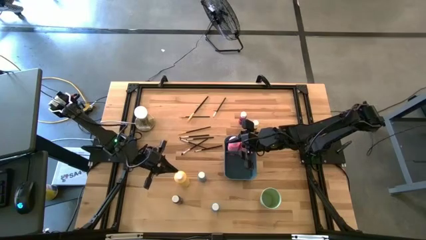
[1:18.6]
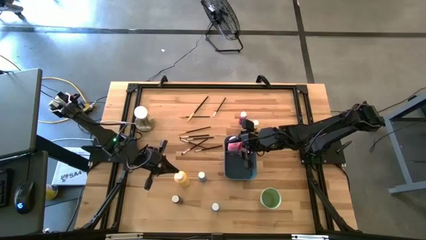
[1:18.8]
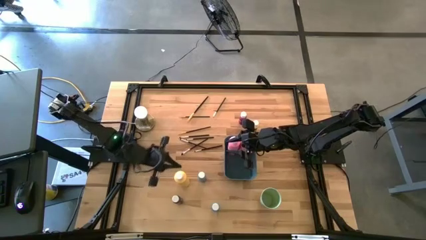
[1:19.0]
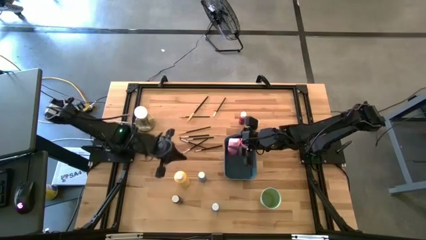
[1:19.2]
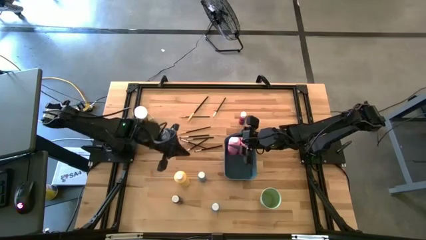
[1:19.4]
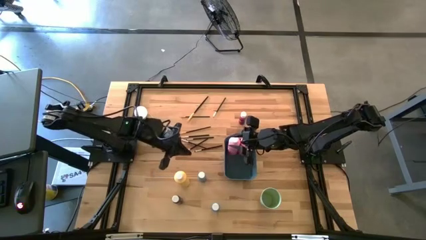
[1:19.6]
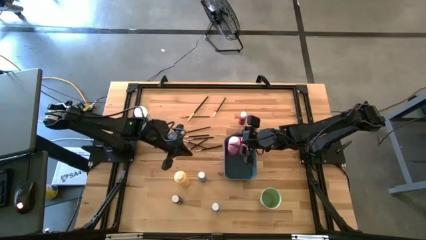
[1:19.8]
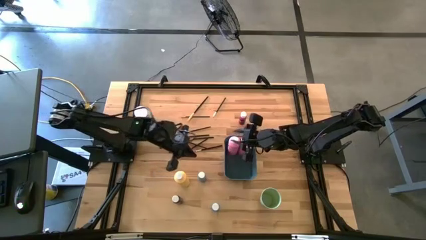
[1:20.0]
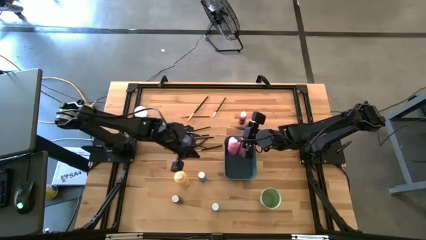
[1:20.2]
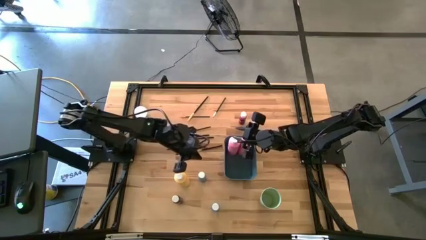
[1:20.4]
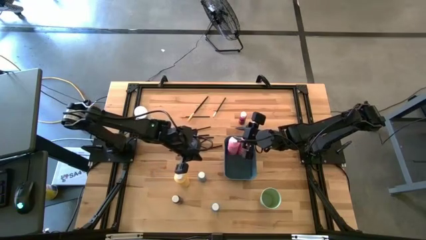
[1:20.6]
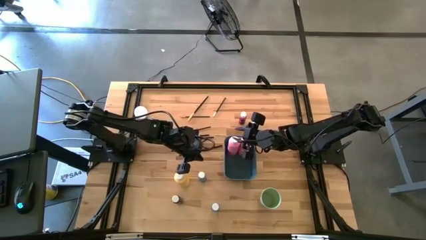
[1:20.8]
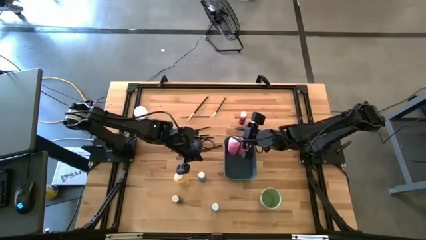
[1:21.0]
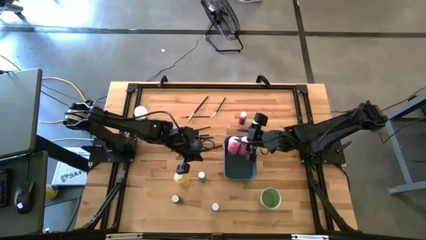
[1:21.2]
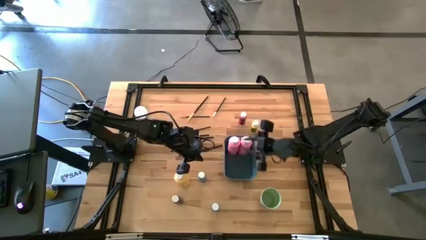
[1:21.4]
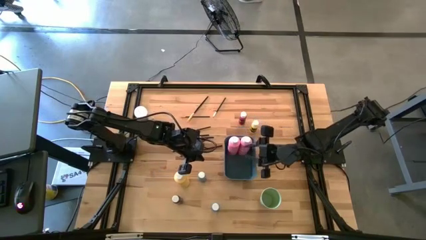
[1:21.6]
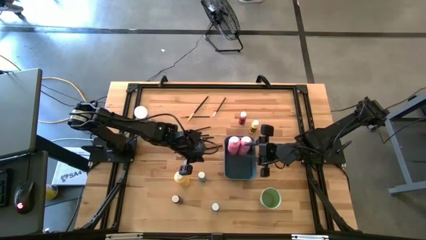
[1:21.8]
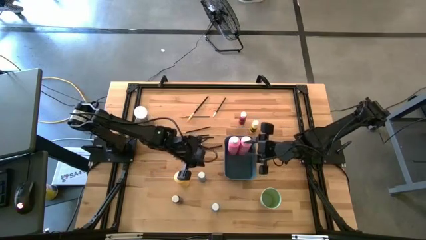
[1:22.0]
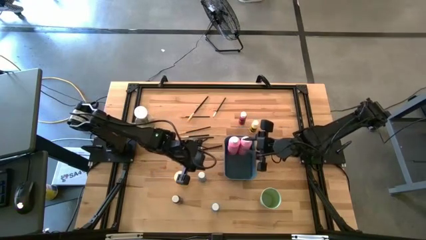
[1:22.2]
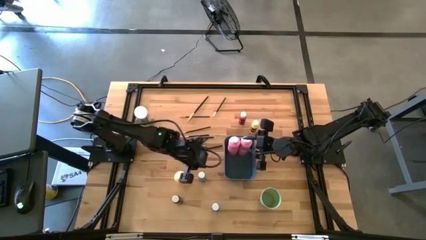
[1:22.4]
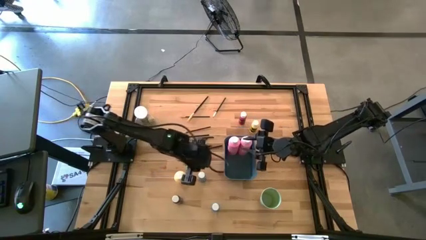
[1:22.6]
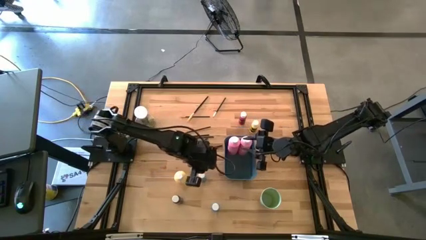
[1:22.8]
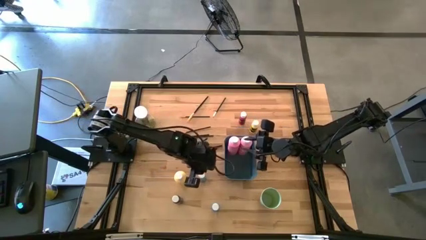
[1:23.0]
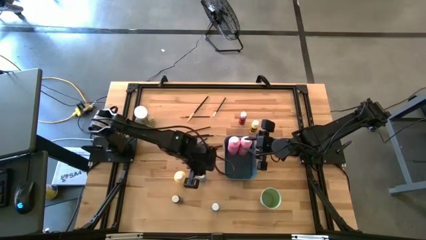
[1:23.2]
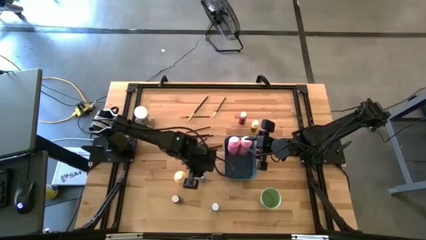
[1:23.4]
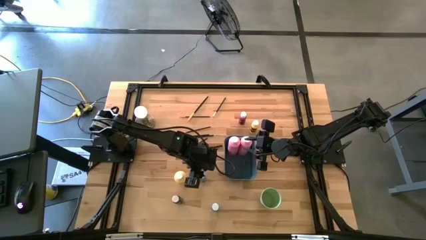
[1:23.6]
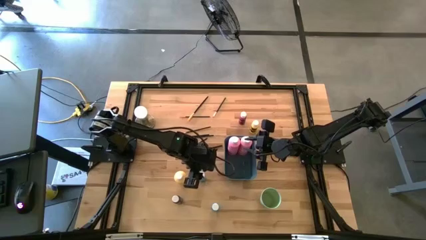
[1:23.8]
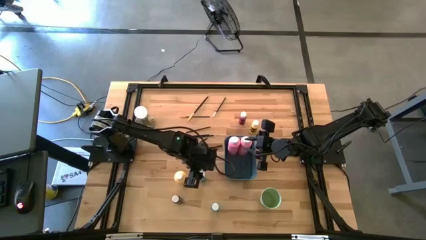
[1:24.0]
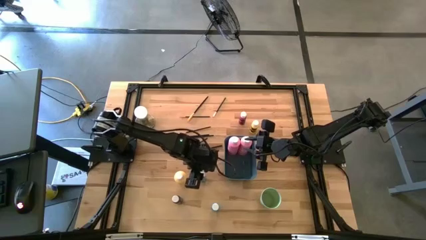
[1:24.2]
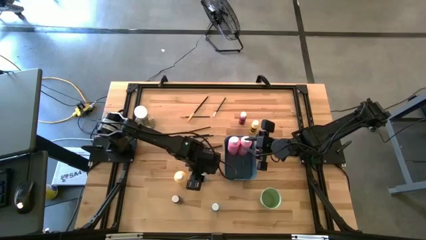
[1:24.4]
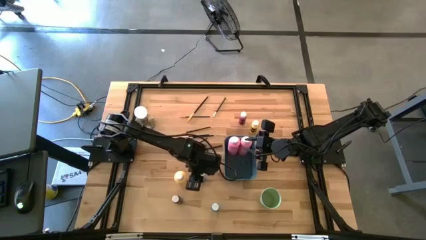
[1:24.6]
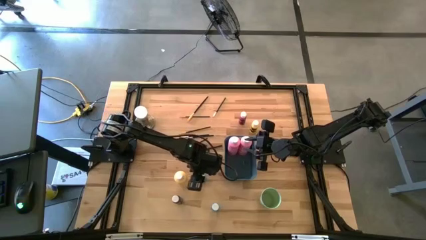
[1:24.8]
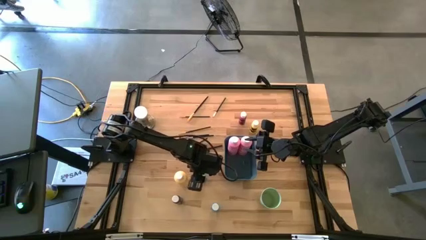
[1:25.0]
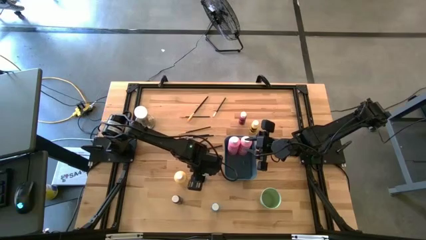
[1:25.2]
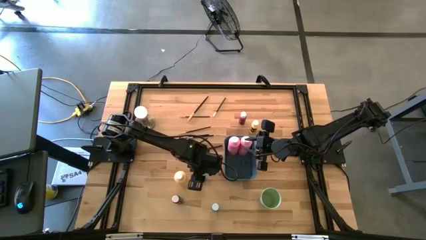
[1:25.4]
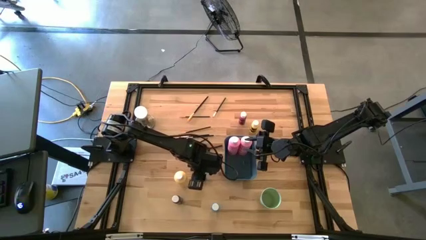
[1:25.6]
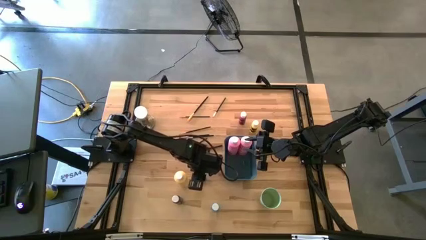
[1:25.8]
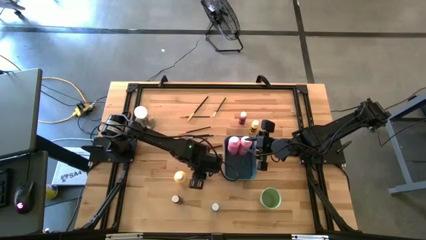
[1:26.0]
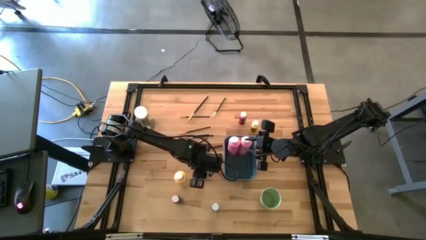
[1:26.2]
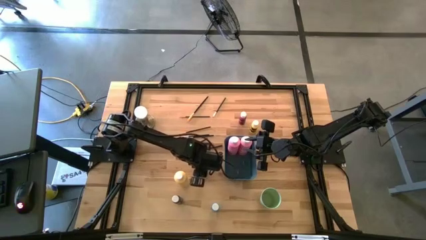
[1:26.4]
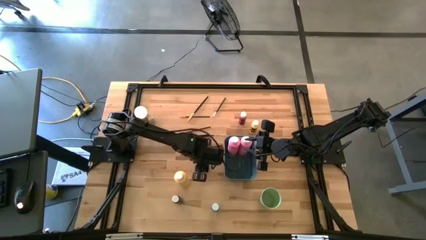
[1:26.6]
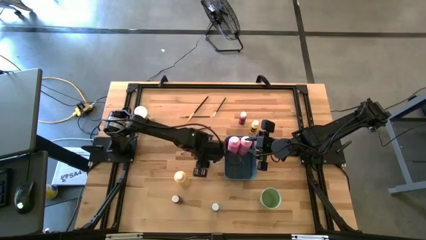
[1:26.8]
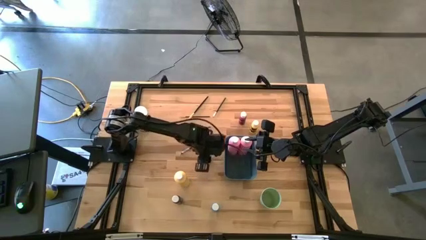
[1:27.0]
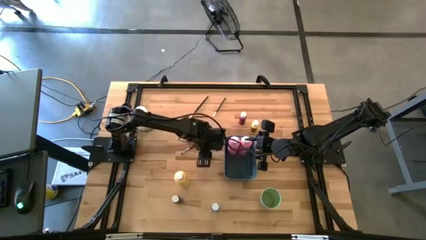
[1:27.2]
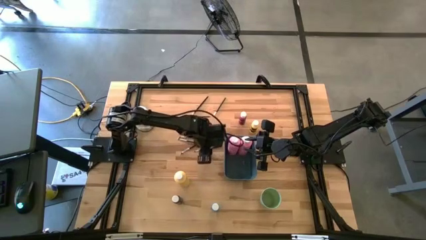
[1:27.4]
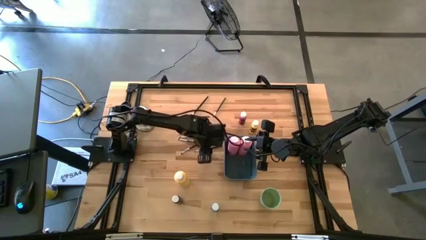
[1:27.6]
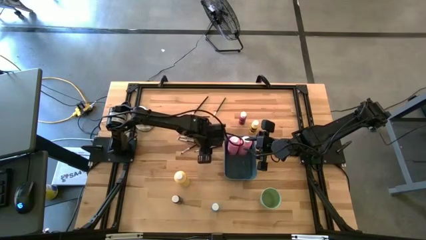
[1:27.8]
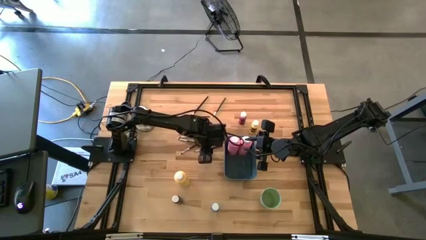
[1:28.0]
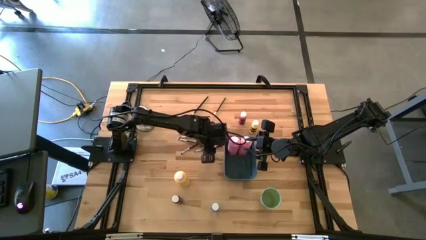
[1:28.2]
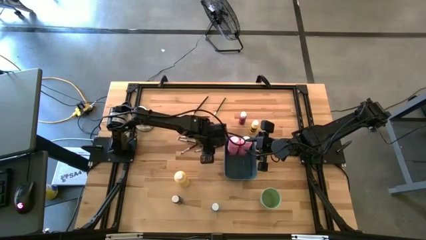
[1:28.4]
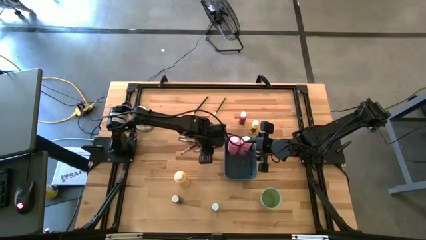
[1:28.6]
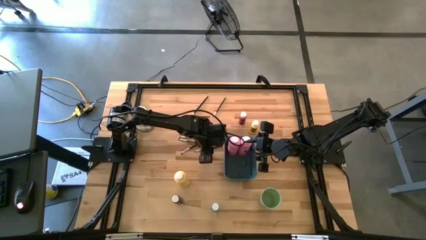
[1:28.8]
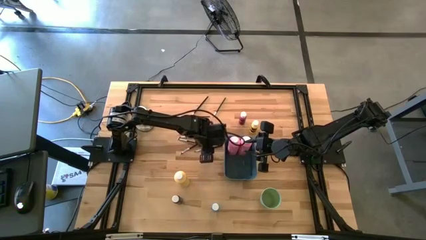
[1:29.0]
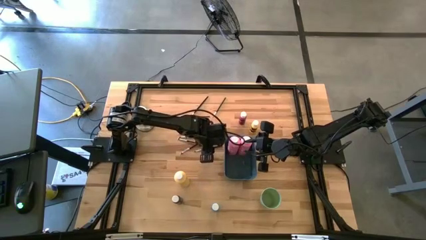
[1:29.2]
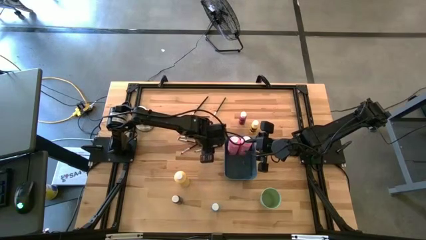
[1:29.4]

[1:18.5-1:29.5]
Task: Pick & Place Paint Supplies
Move the small blue and black paint bottle to the center of the table

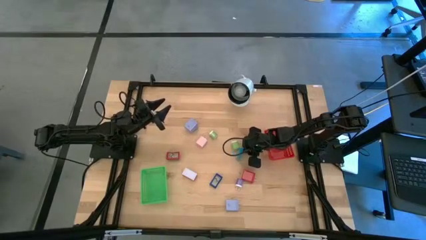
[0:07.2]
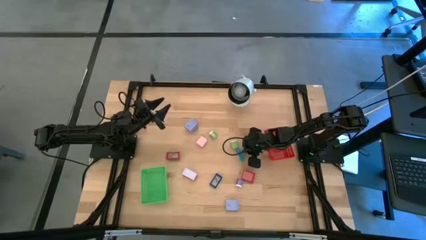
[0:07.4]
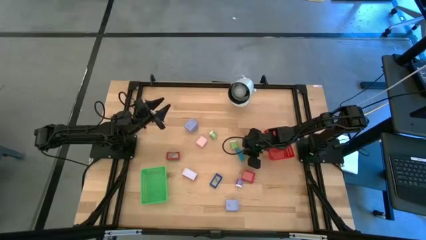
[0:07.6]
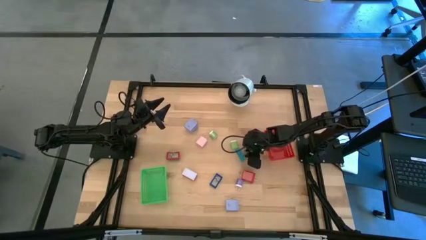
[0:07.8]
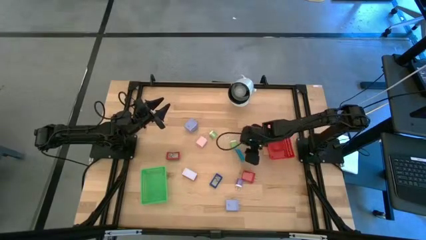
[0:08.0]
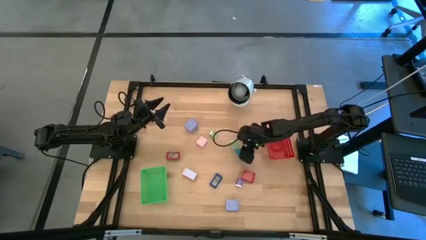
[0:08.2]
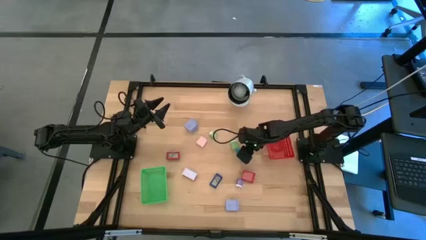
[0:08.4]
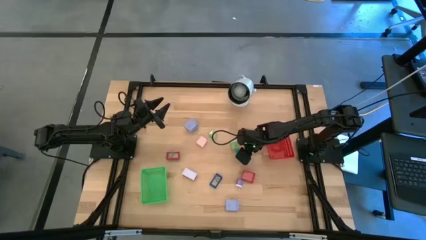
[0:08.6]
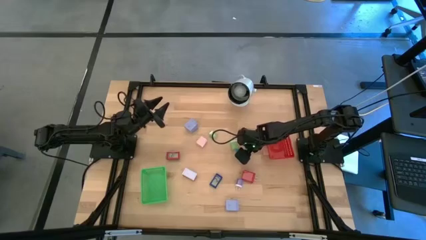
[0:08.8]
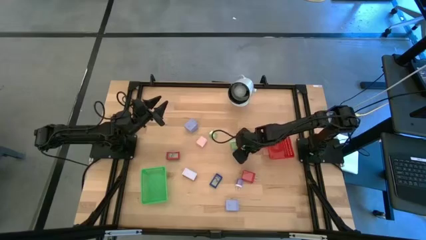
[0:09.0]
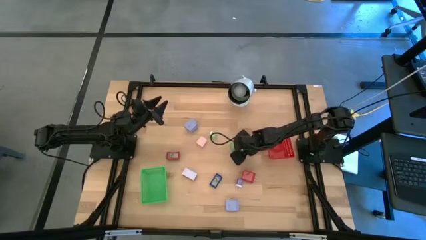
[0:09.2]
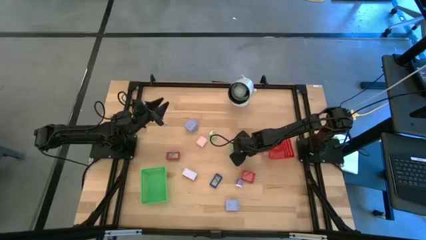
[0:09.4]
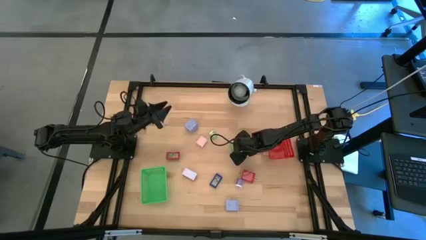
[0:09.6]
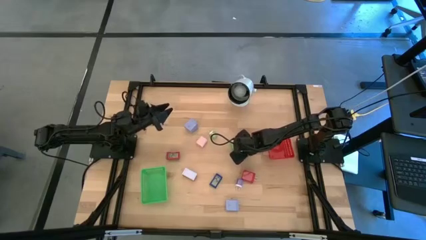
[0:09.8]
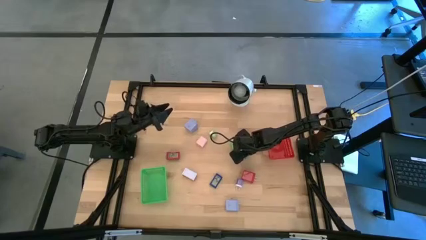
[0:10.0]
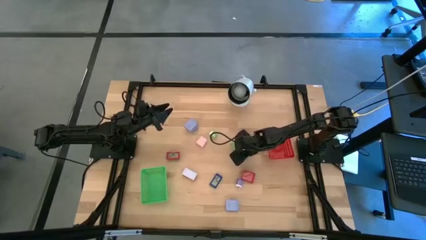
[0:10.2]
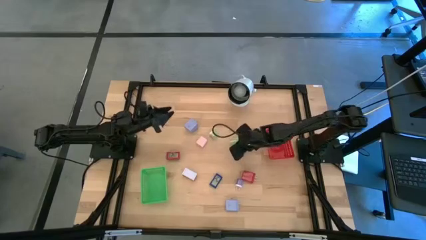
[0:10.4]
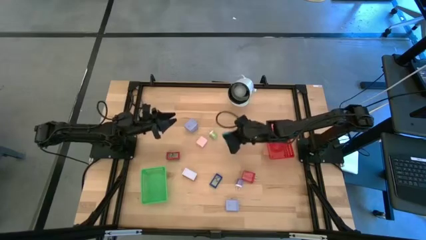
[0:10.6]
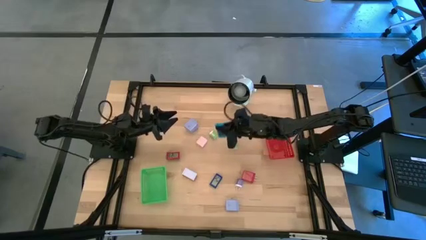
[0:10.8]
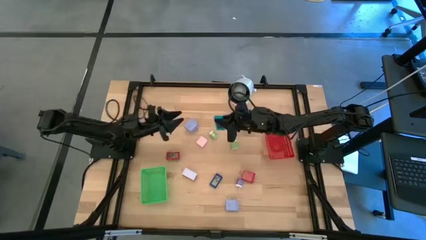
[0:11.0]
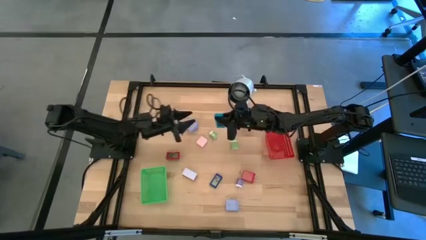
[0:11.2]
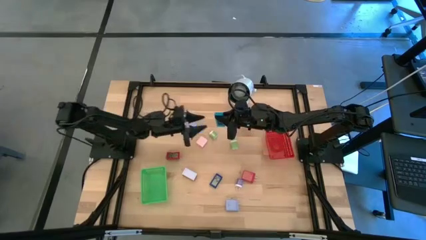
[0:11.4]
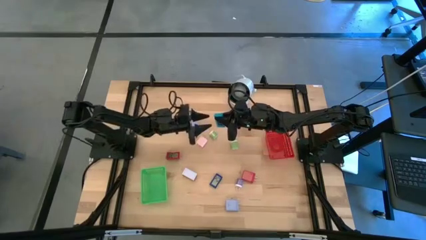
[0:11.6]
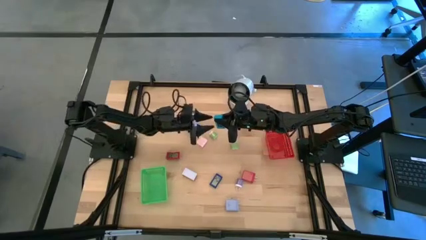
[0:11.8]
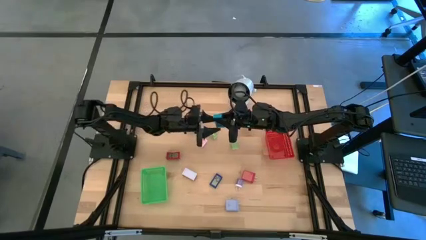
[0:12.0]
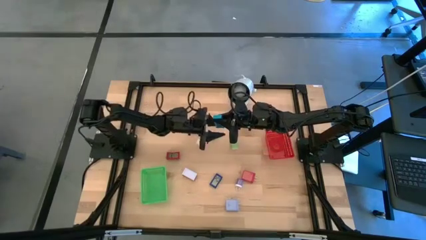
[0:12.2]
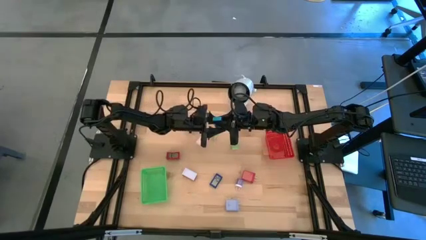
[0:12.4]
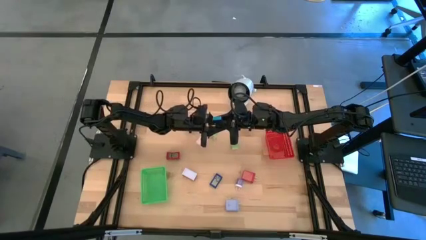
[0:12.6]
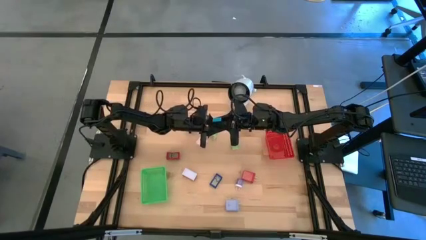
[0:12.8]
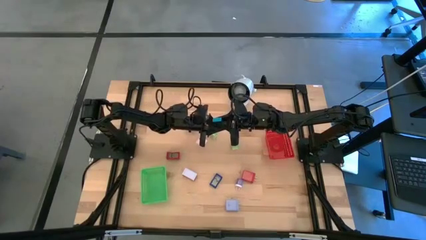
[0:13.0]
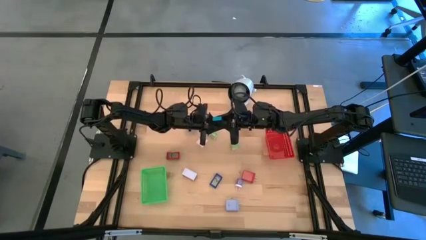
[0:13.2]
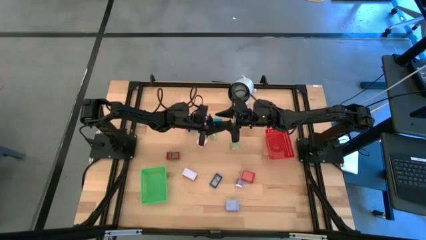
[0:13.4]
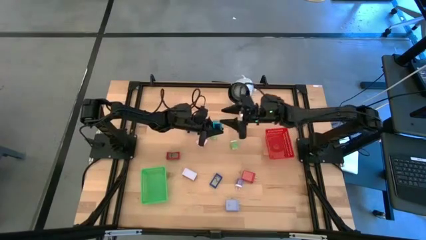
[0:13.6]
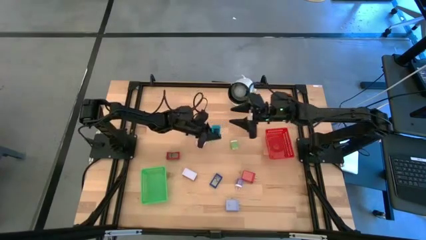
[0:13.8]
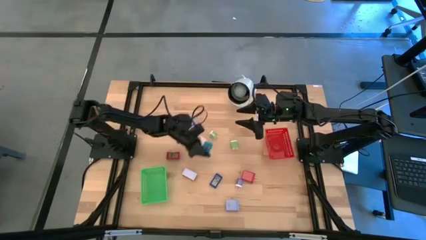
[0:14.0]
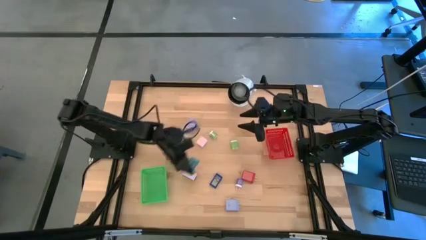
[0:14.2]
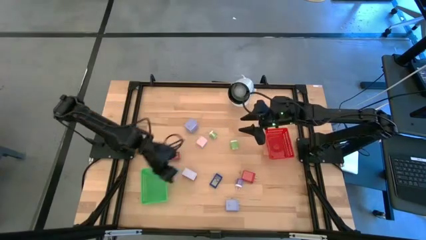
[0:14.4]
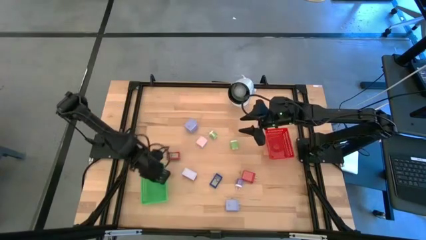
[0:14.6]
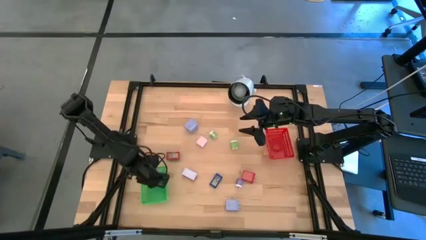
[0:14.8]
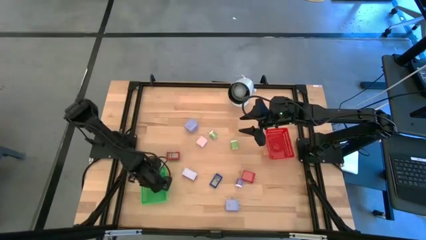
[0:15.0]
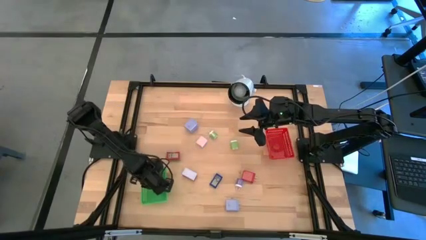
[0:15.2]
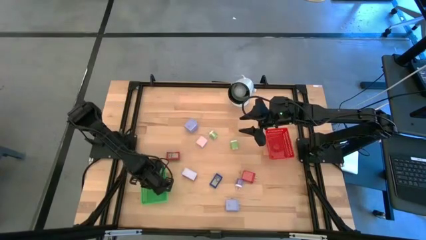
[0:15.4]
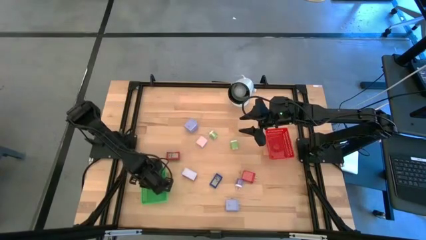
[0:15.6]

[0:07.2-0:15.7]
Task: Pick & Place Office items
Put the right light blue digital clock into the green bin
